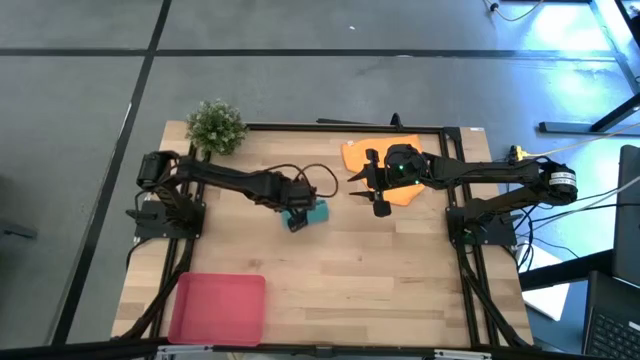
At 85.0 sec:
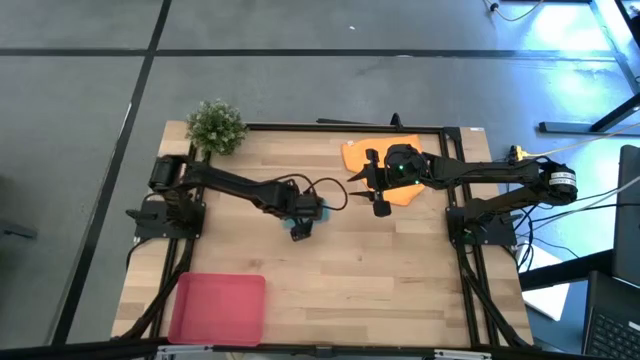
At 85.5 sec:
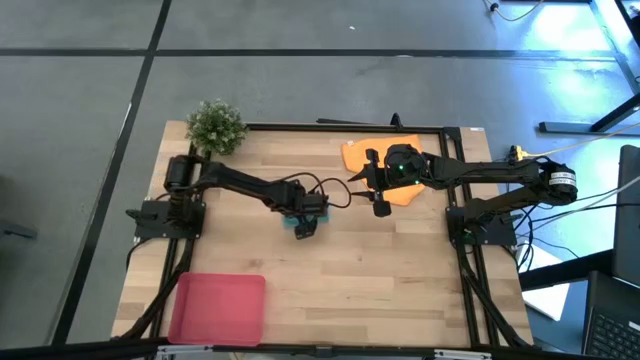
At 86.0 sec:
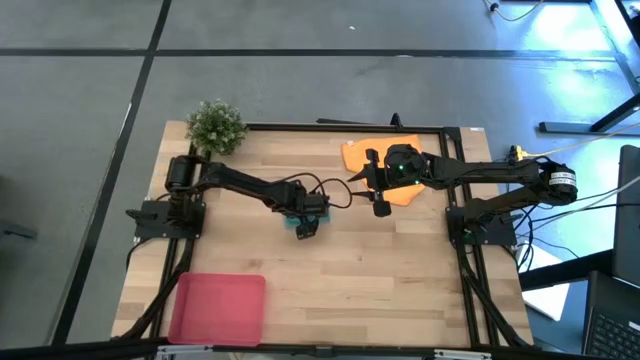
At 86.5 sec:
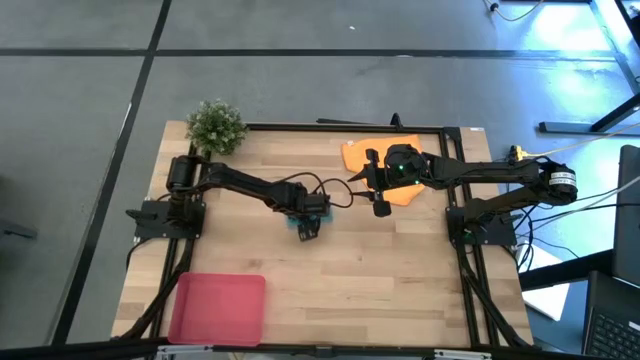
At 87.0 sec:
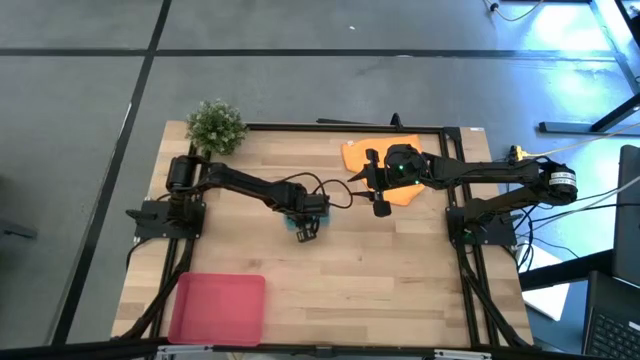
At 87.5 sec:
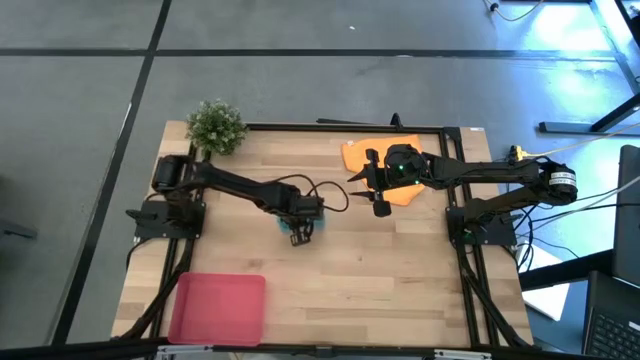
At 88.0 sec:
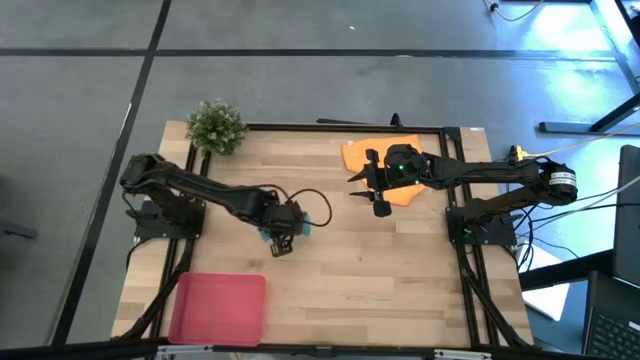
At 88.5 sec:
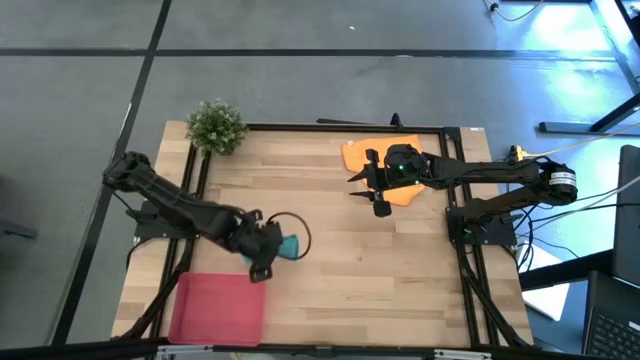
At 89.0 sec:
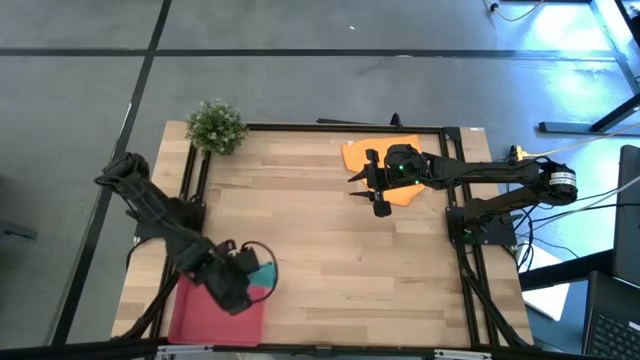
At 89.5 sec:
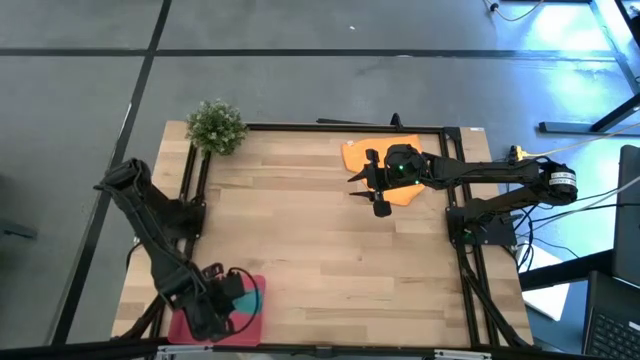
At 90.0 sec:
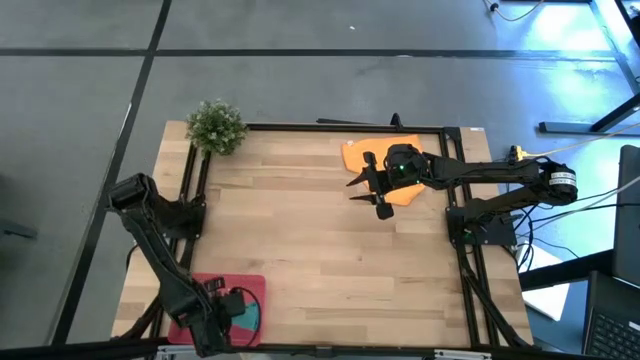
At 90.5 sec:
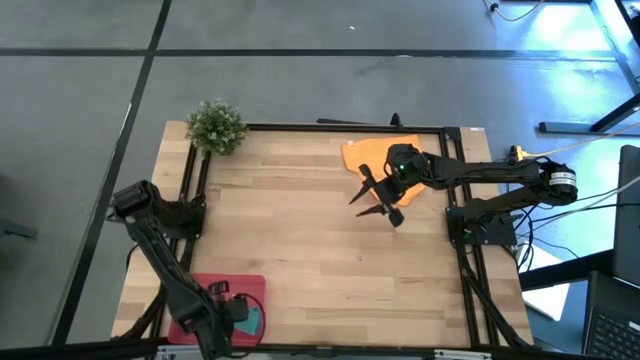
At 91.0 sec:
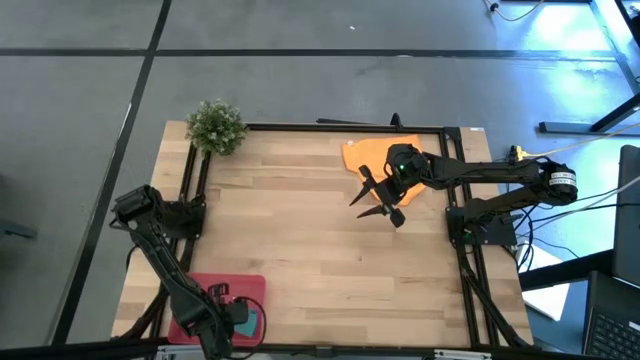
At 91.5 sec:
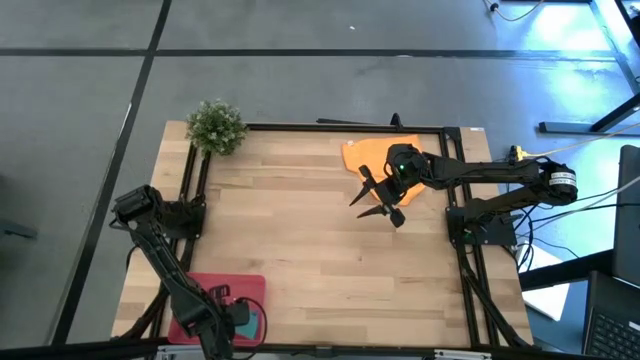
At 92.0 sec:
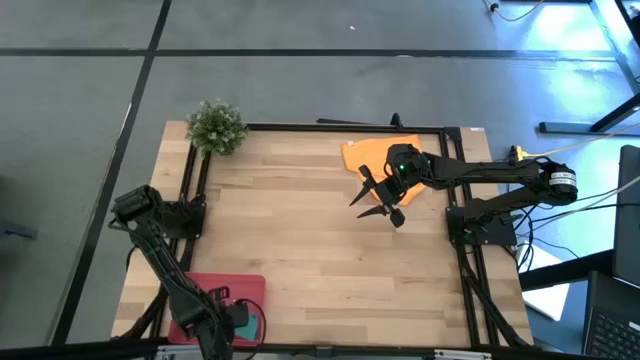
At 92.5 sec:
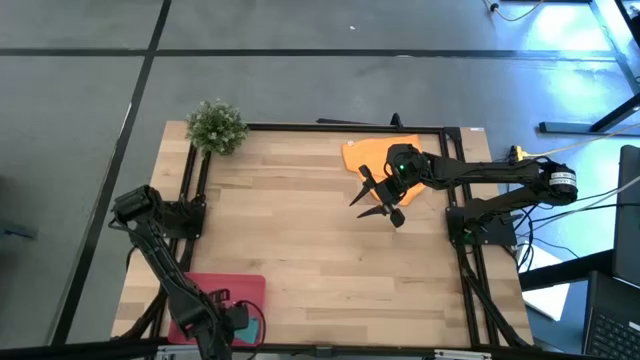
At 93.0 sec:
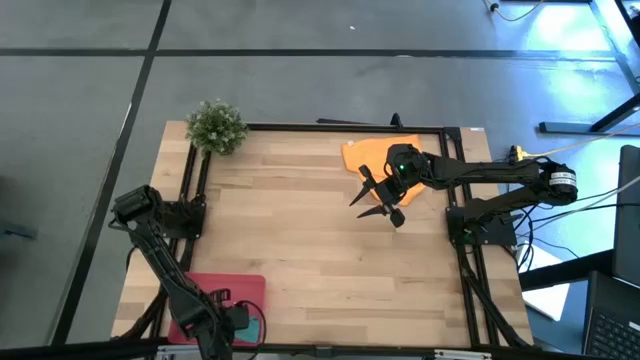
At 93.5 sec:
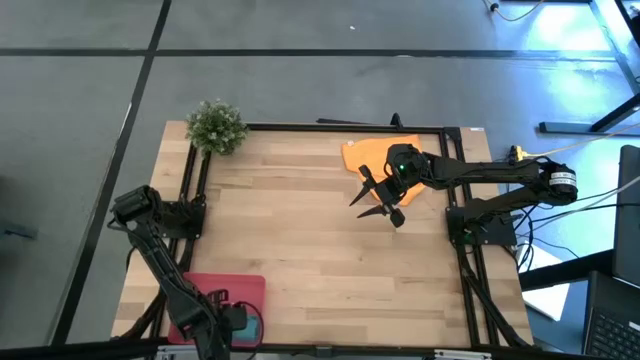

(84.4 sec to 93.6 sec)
Task: Roll microfiber towels into tight, uniform cylinder then place into a basket
Put the blue microfiber towel into the red bin

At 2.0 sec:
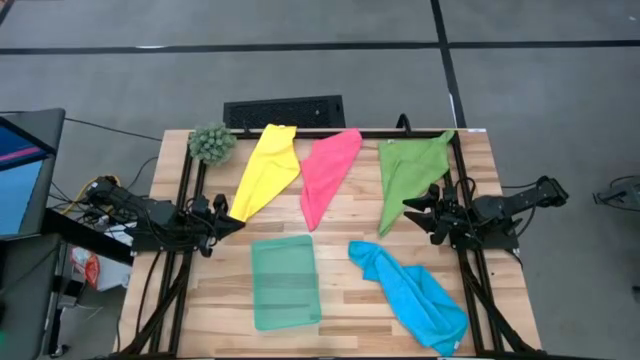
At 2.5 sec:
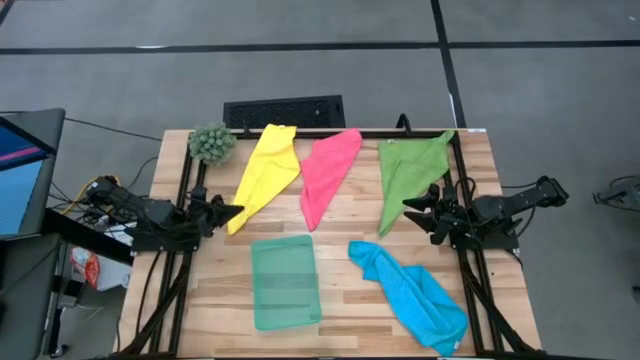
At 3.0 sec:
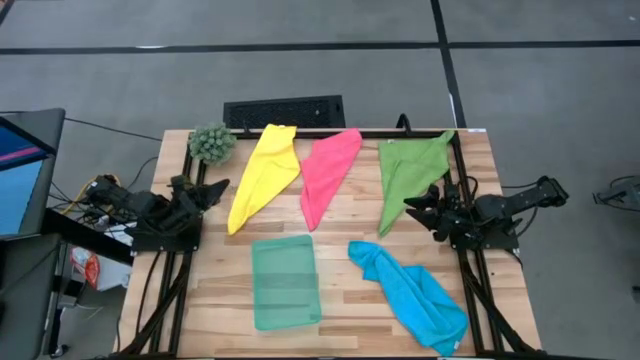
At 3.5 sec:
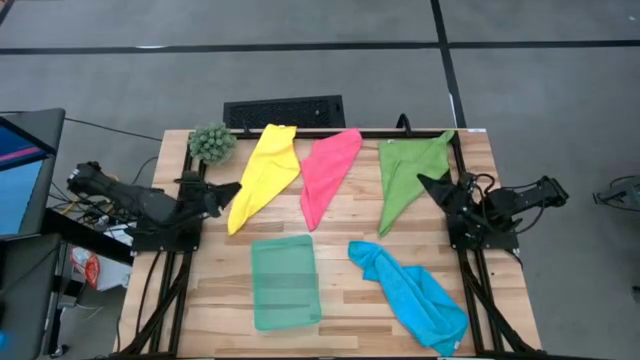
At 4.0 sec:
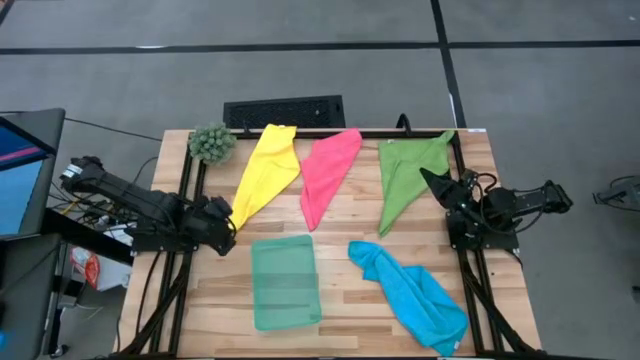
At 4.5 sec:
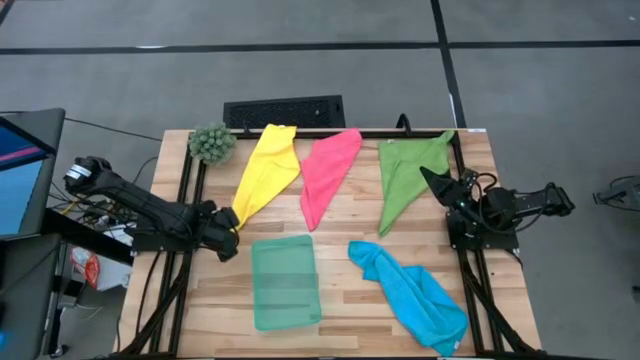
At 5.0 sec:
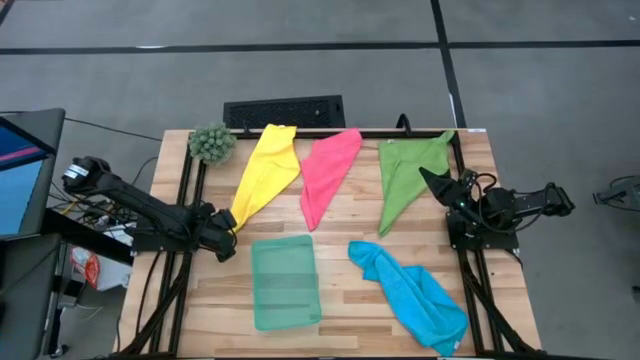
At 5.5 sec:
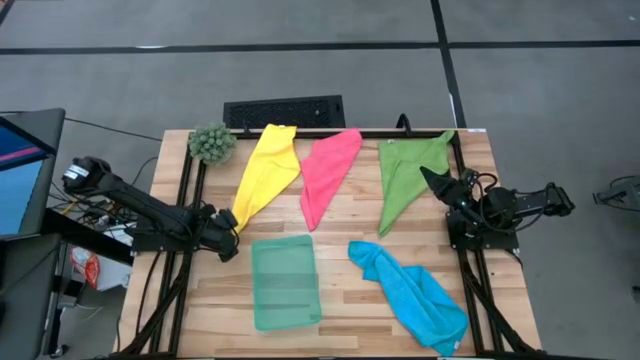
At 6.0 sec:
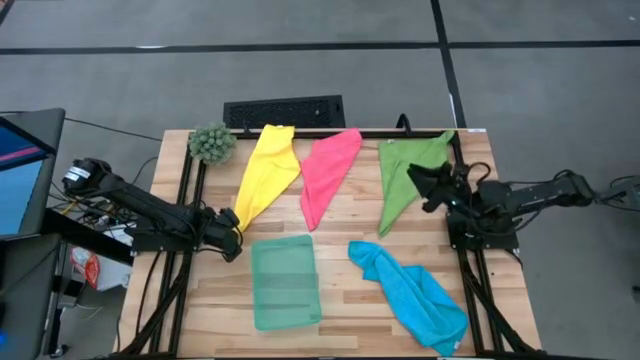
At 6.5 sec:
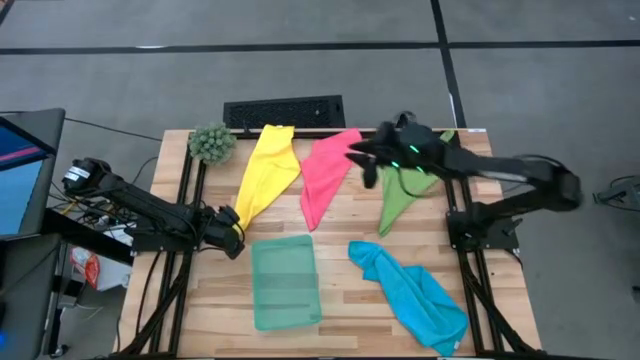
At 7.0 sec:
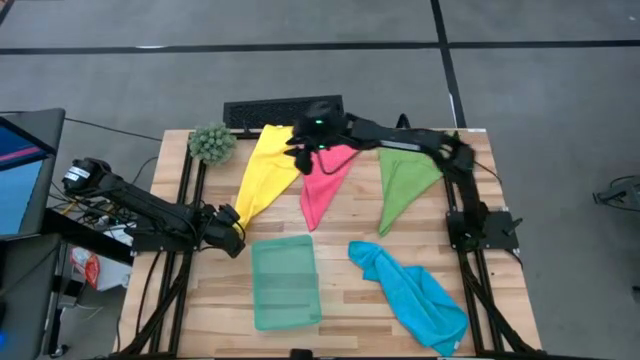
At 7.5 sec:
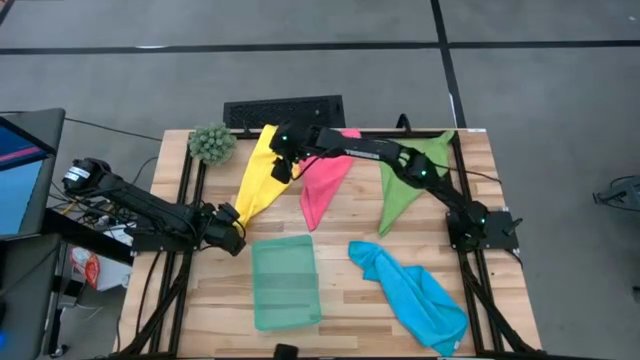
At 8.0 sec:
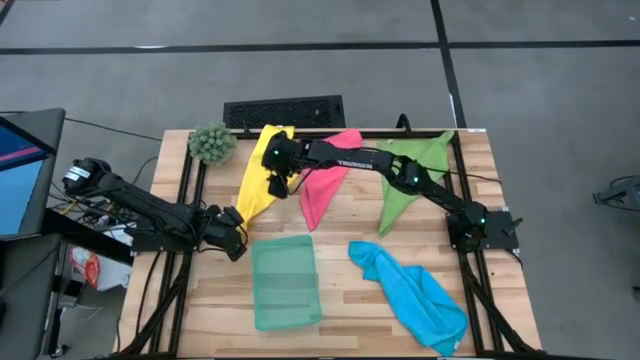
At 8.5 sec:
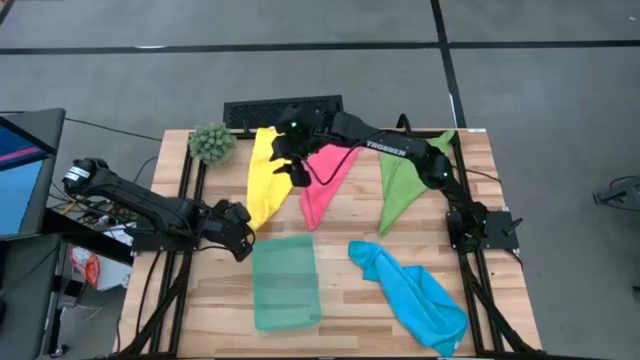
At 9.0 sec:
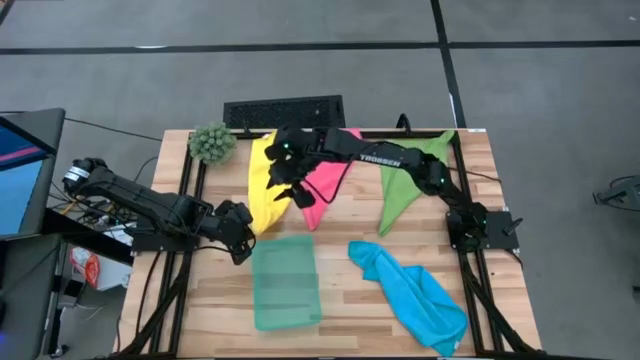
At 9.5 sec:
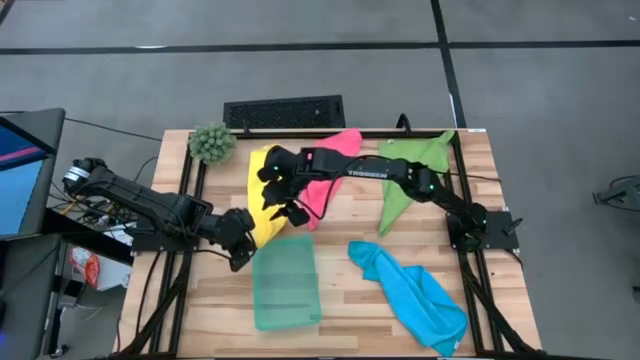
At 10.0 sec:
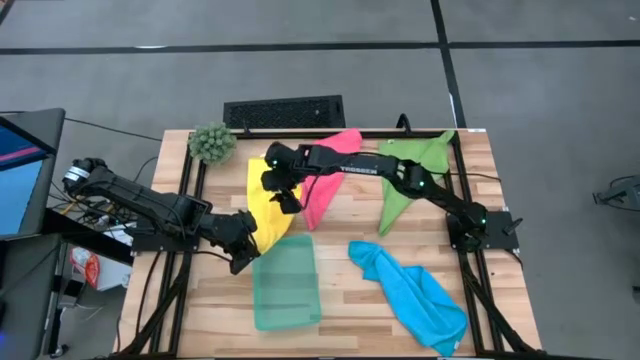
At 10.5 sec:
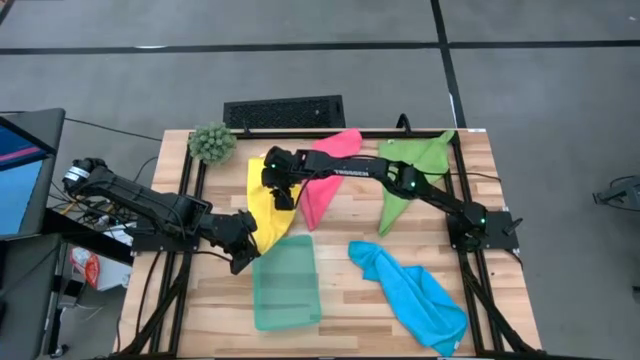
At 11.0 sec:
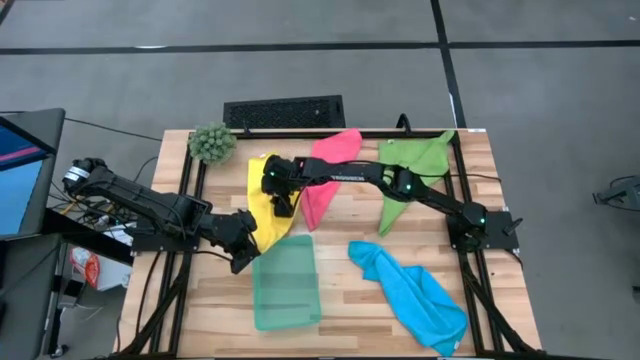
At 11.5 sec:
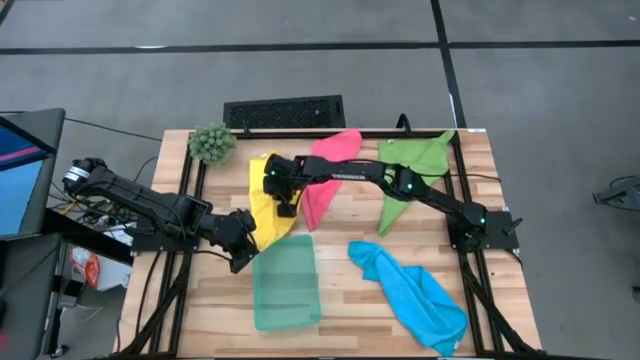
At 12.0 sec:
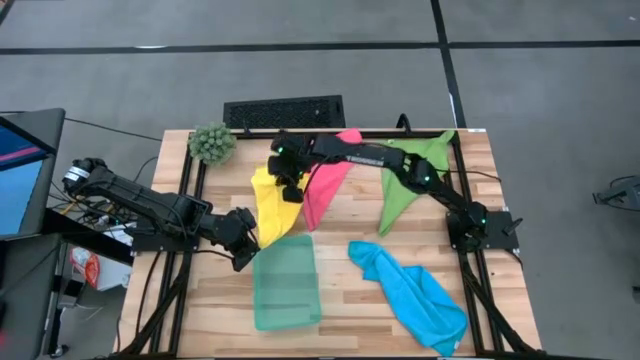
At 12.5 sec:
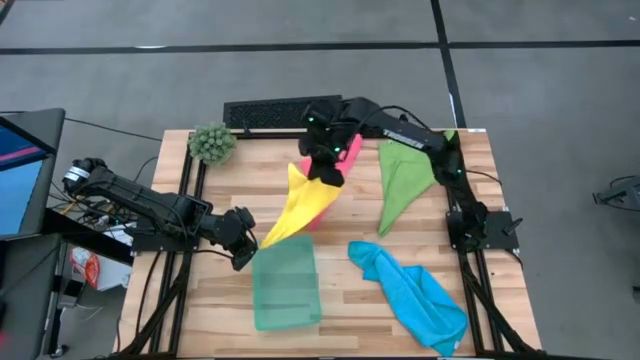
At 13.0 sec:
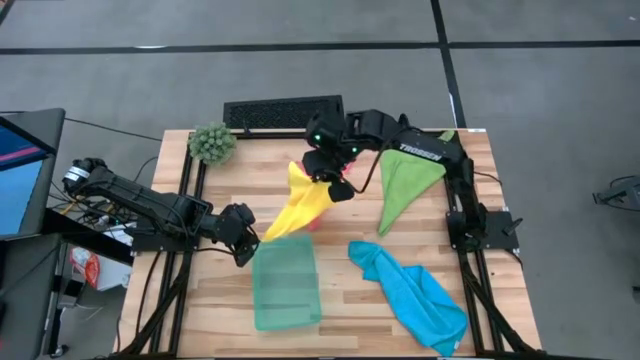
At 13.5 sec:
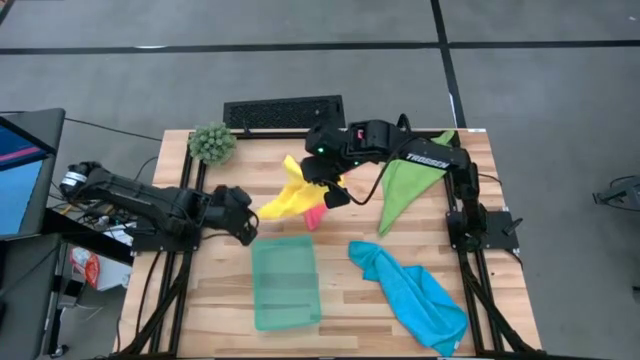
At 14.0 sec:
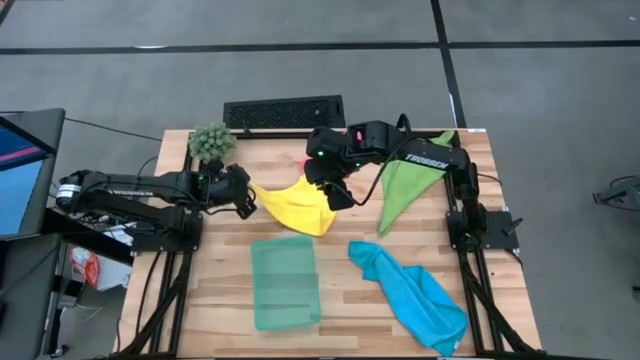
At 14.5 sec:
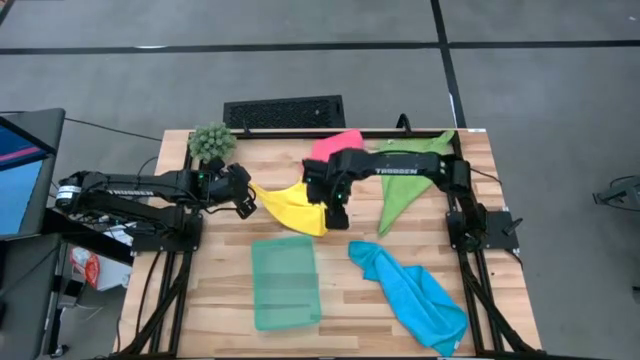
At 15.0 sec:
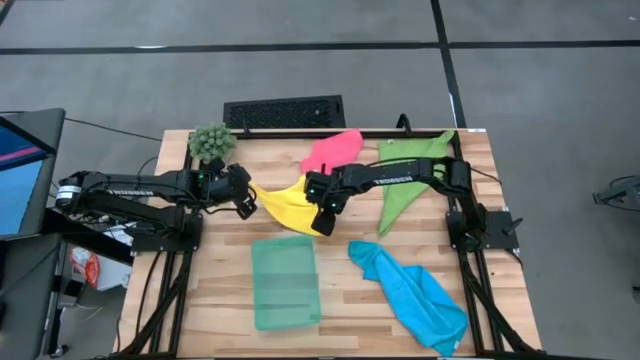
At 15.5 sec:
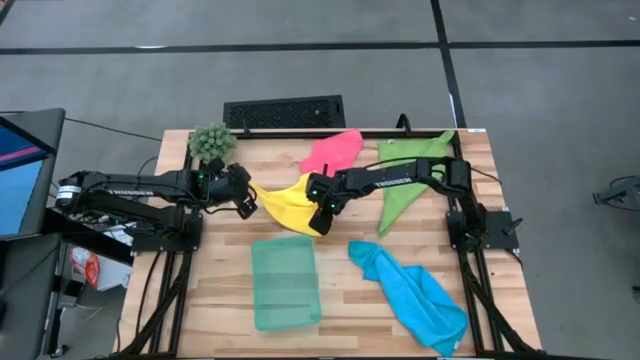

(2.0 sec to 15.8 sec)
Task: Fold microfiber towels
Fold the yellow towel
